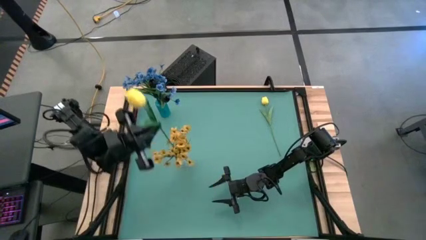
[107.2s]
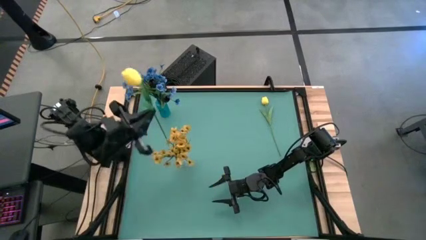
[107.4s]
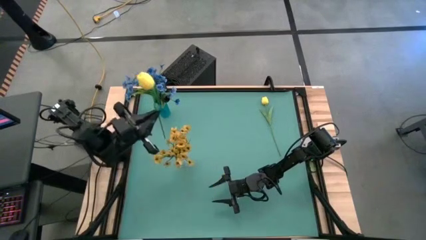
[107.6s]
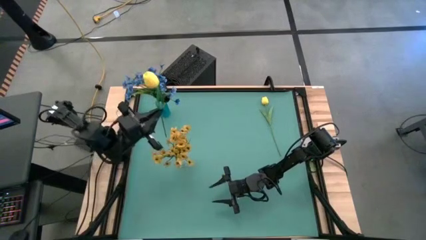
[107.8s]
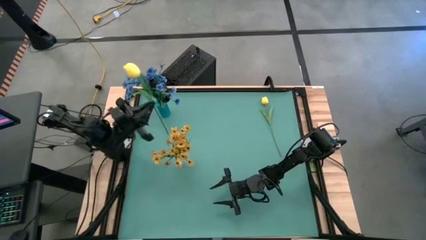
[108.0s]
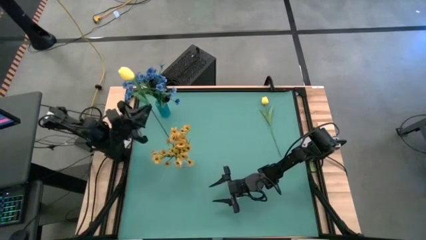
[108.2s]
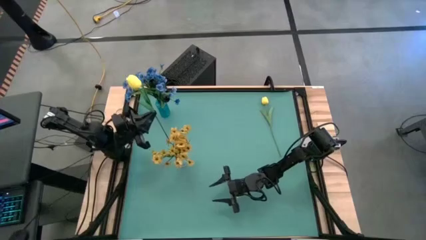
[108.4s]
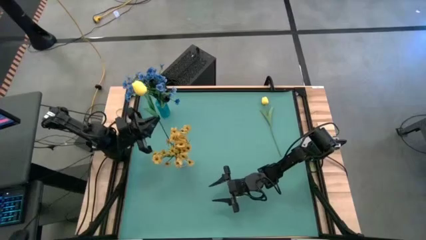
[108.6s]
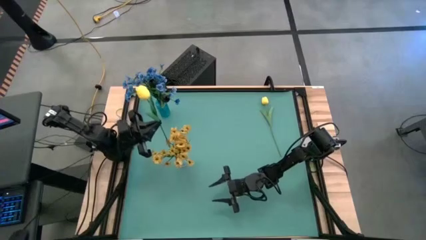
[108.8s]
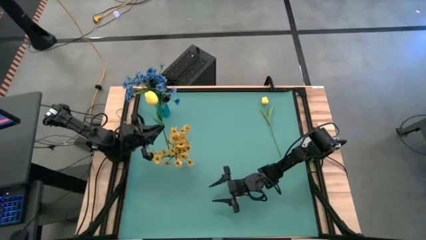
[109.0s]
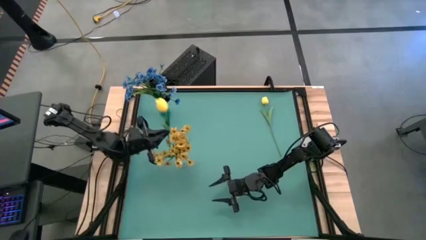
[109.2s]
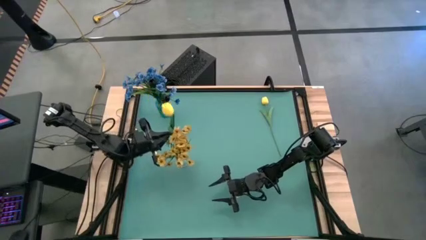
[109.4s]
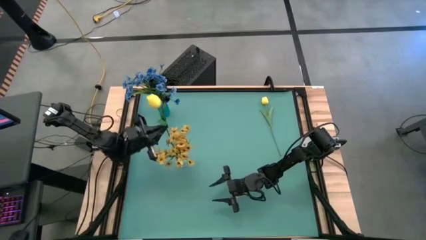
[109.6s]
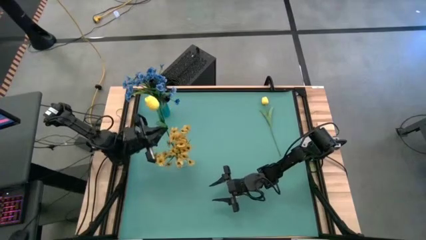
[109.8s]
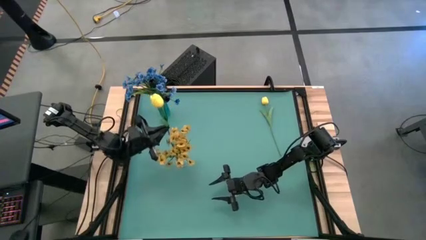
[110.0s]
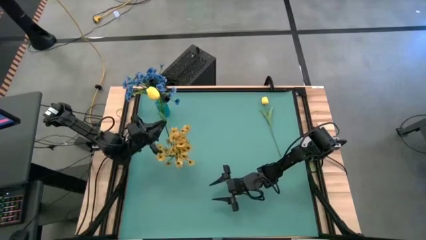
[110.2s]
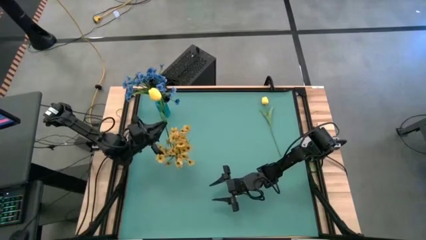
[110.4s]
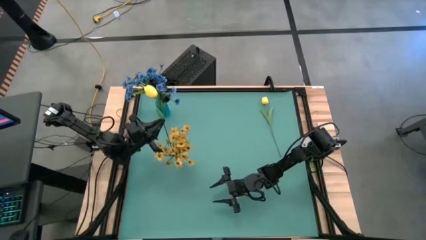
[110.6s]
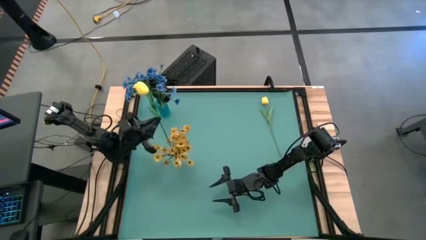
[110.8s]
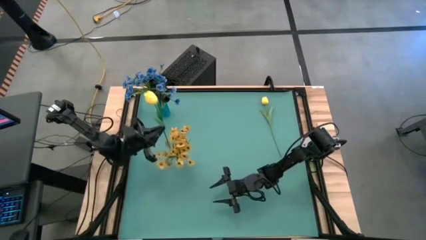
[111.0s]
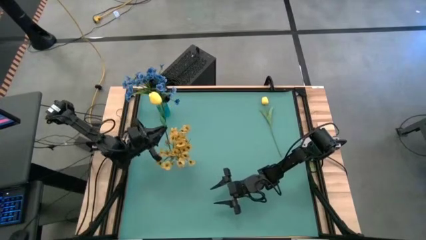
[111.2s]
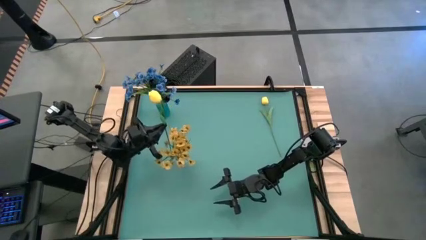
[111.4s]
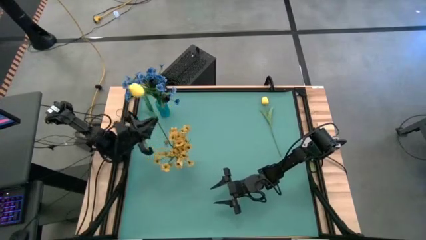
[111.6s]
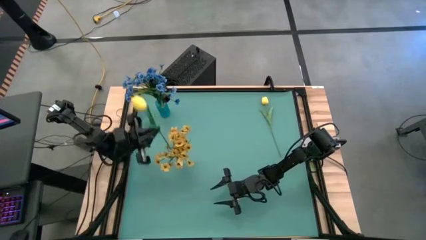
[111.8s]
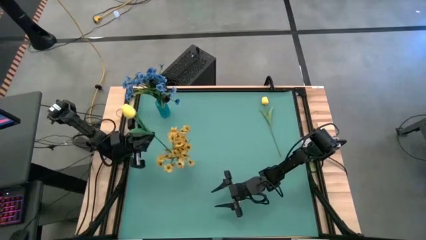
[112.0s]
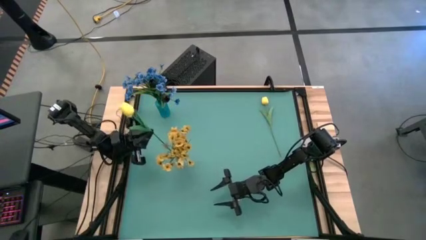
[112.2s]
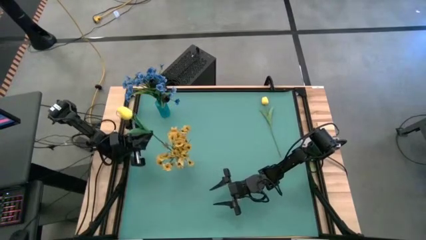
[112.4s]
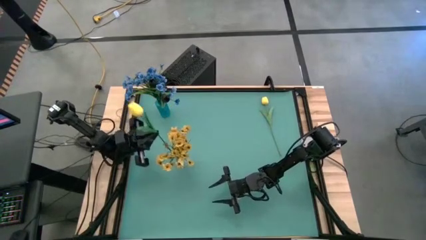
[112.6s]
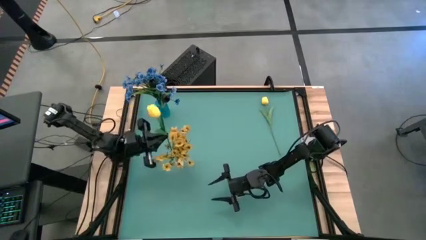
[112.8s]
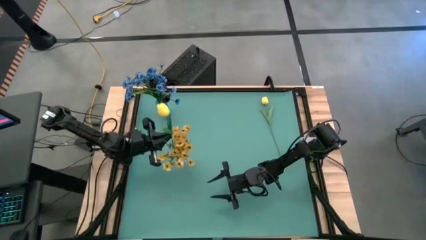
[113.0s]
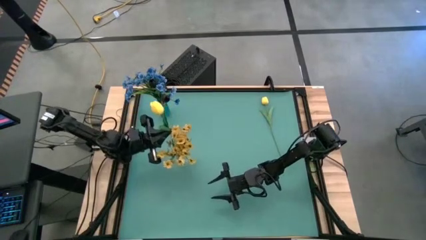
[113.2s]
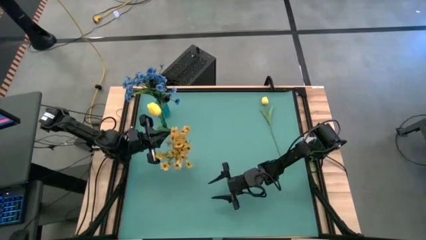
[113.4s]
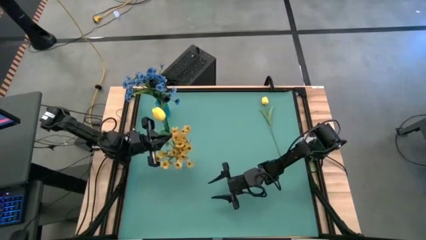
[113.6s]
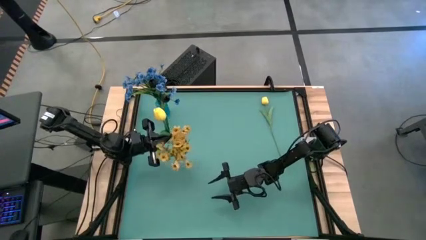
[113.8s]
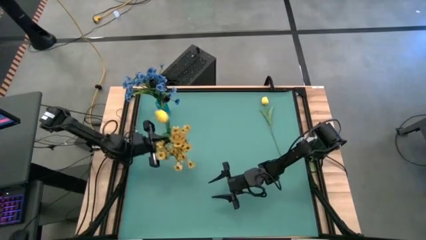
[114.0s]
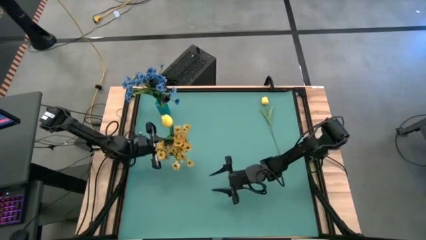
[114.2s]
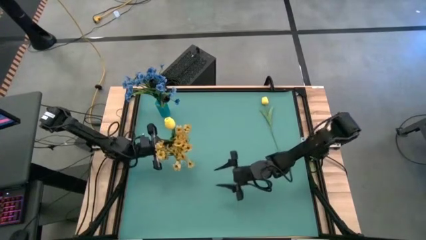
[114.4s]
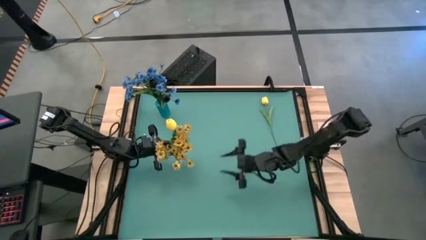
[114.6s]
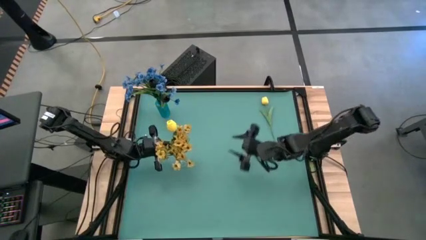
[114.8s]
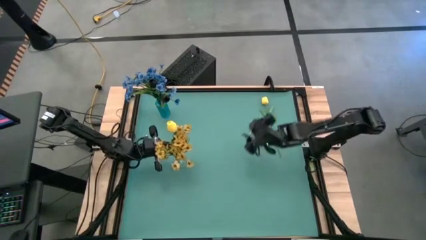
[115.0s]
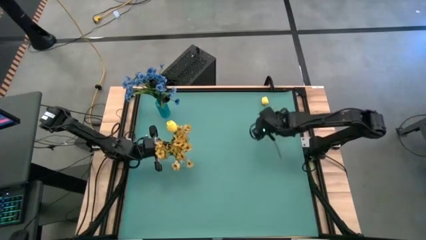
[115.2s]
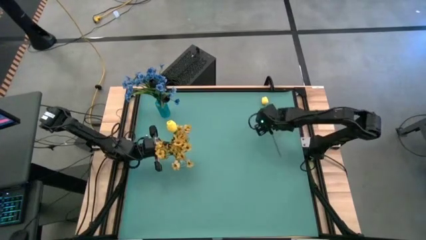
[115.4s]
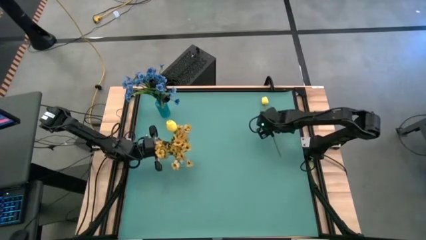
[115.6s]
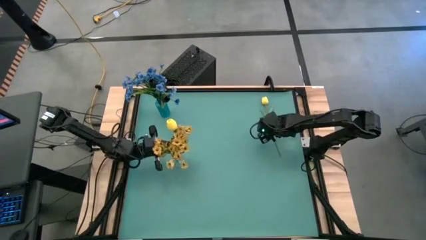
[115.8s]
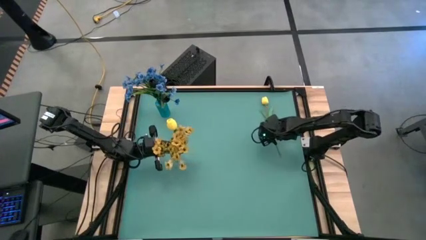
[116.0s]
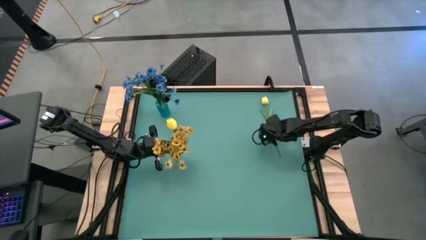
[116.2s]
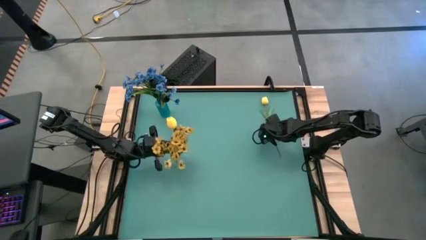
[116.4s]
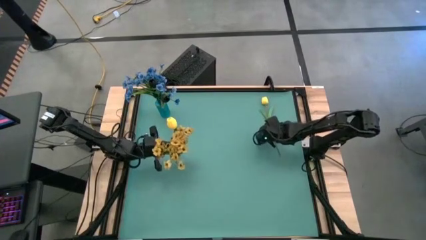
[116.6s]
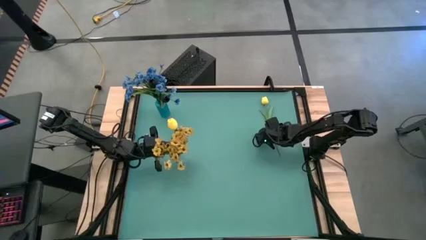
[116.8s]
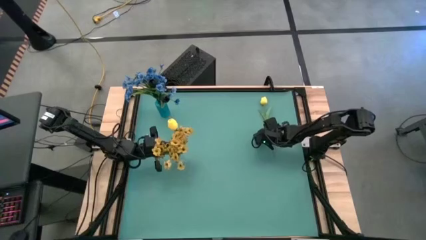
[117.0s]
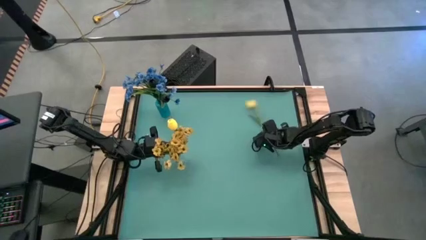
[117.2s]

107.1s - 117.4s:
Task: Sort flowers into vase by color
Put the left yellow flower into the transparent vase

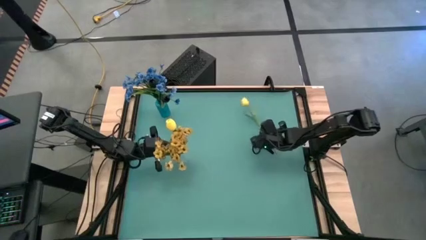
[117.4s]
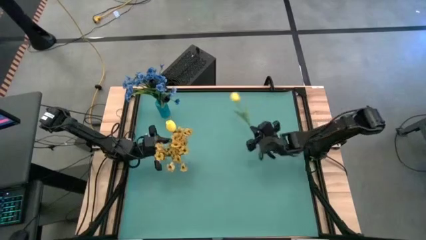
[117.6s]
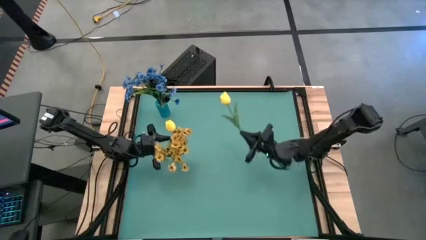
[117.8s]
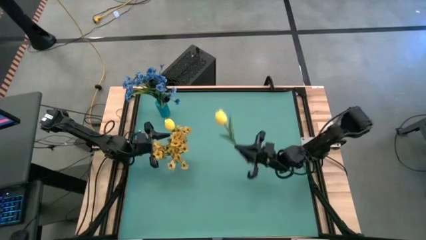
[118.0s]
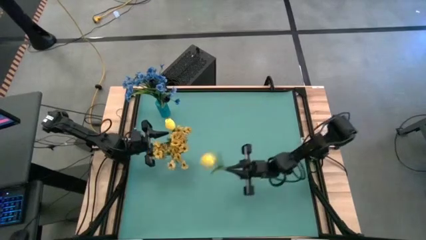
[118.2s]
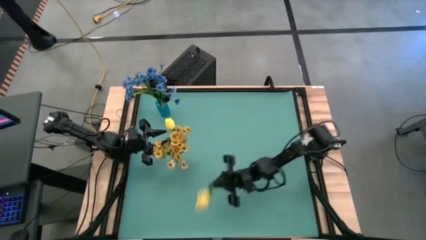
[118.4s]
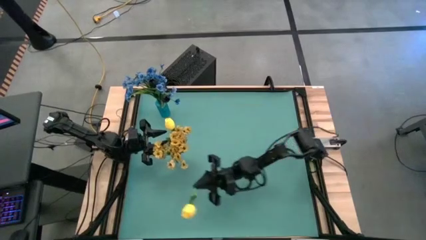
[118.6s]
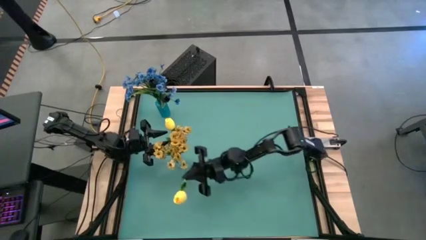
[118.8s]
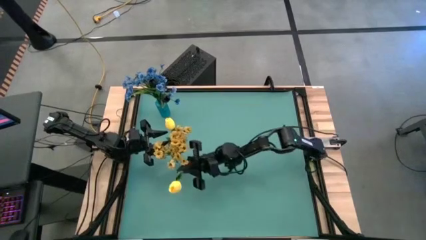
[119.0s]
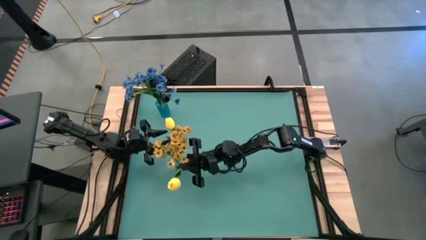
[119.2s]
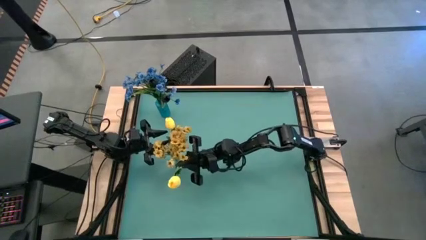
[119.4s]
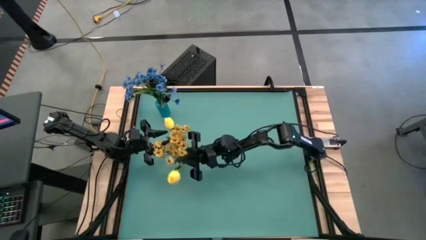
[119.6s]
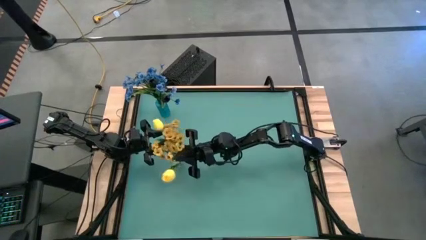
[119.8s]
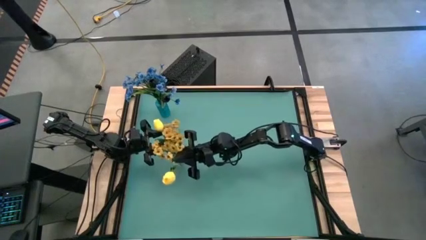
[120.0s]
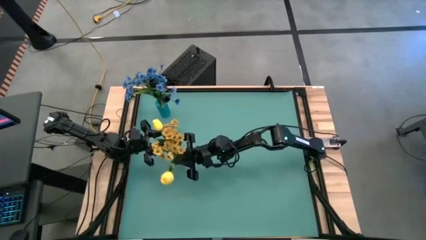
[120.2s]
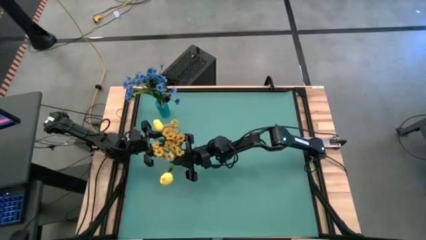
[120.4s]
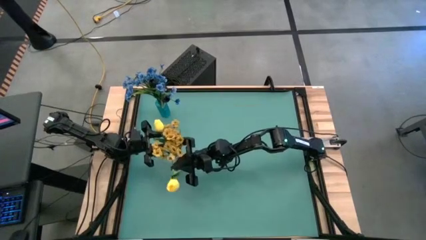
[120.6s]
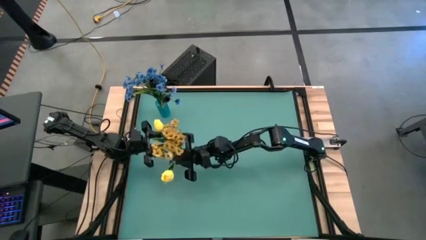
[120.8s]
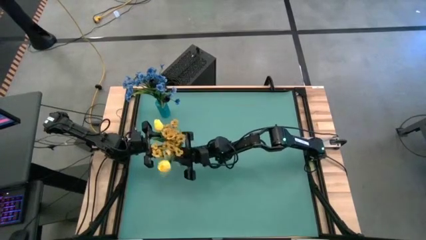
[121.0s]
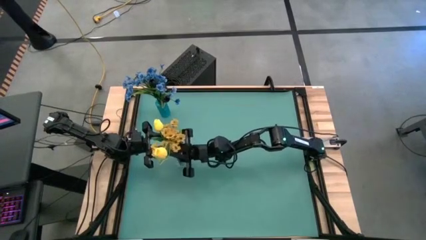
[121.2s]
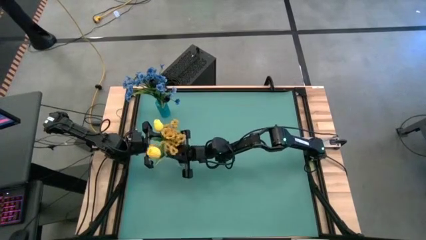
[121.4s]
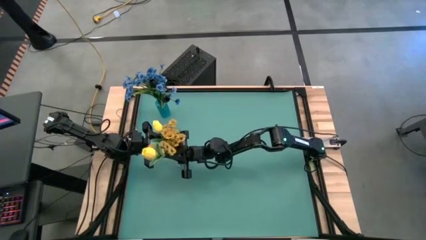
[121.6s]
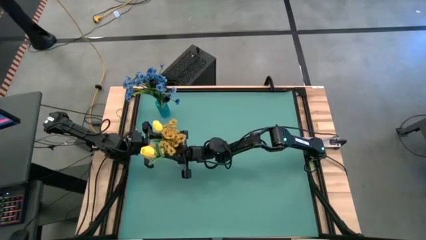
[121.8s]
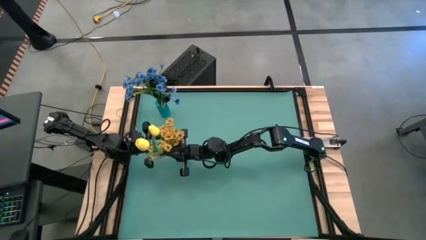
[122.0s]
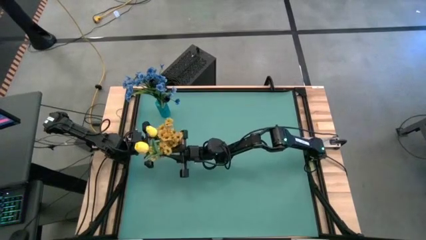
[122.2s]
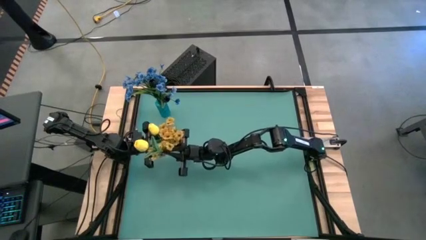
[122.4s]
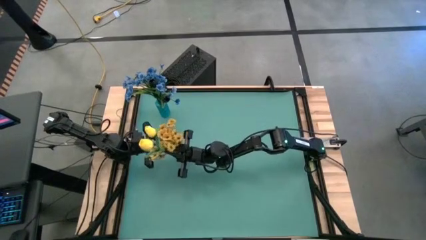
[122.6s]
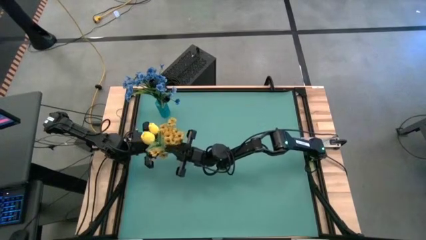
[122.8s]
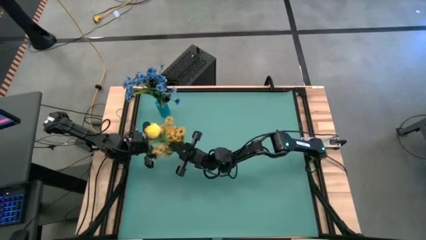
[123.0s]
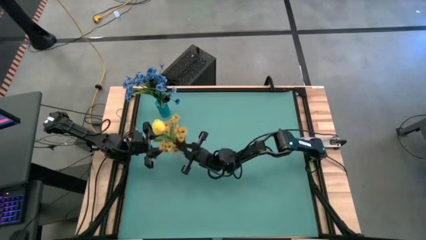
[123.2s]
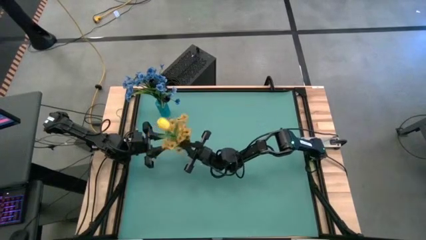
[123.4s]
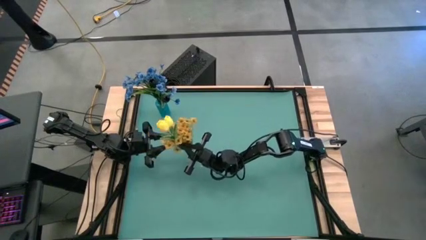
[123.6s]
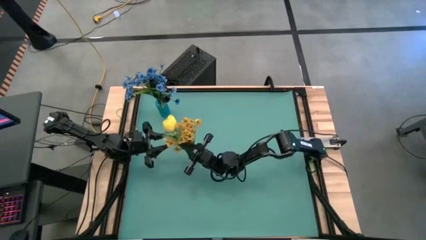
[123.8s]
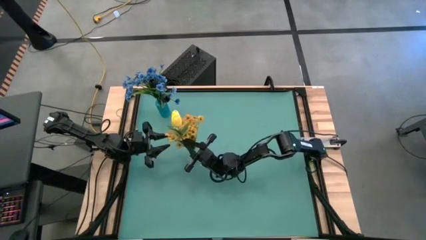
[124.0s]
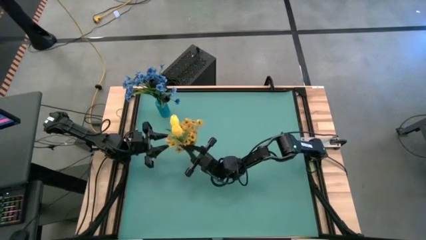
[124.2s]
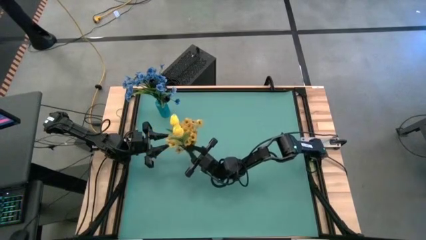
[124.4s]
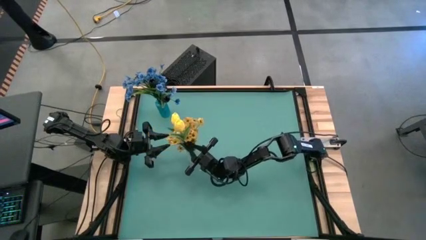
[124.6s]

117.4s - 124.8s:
Put the yellow flower into the transparent vase
